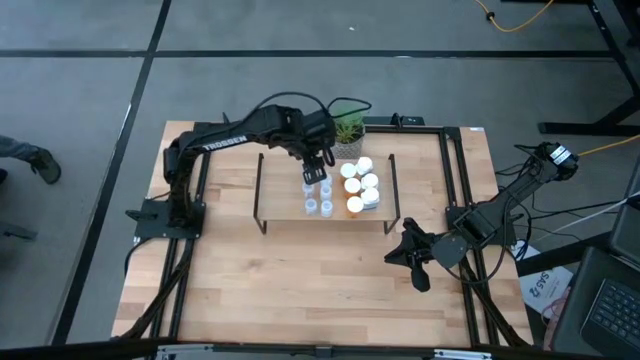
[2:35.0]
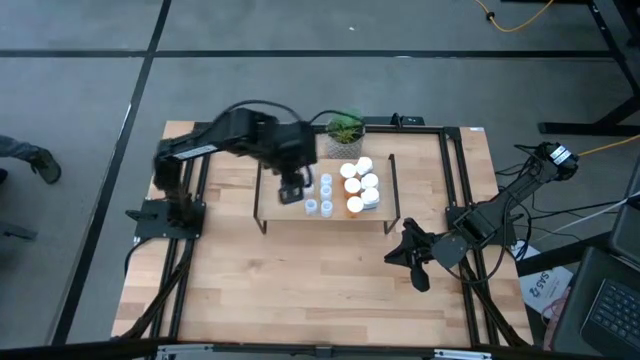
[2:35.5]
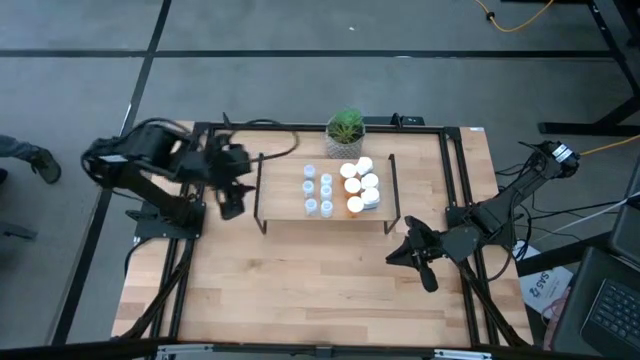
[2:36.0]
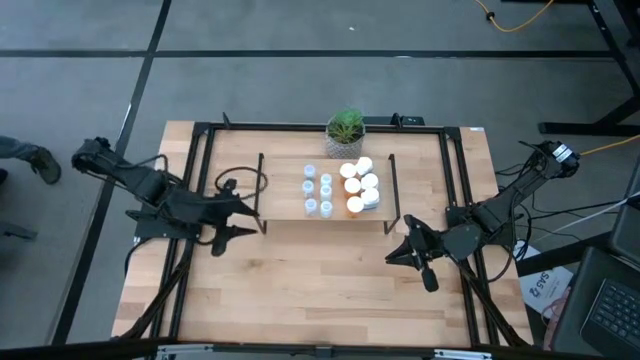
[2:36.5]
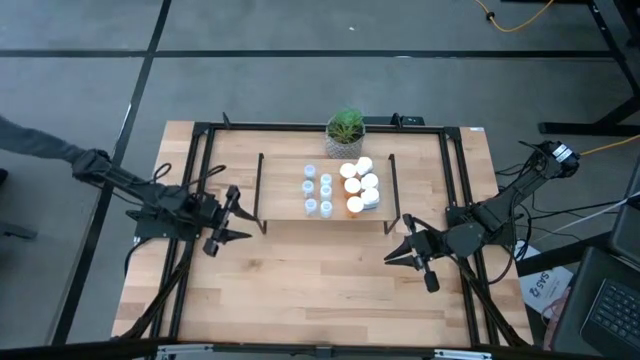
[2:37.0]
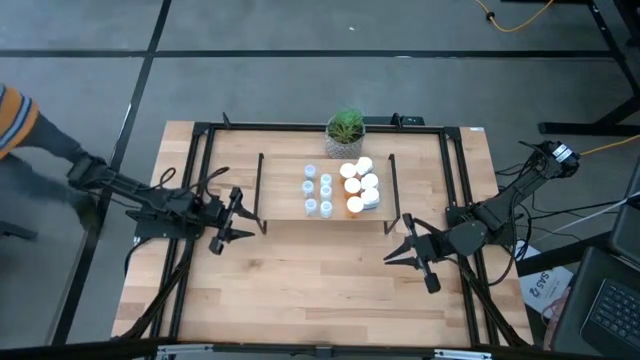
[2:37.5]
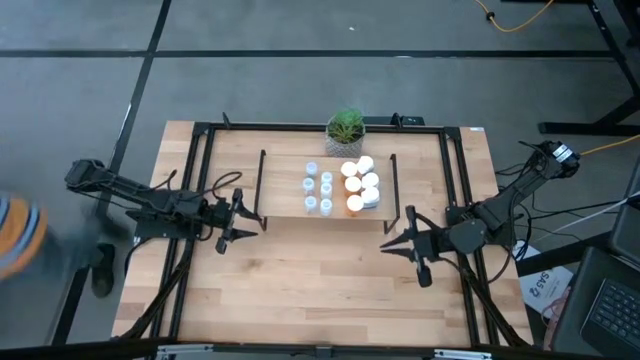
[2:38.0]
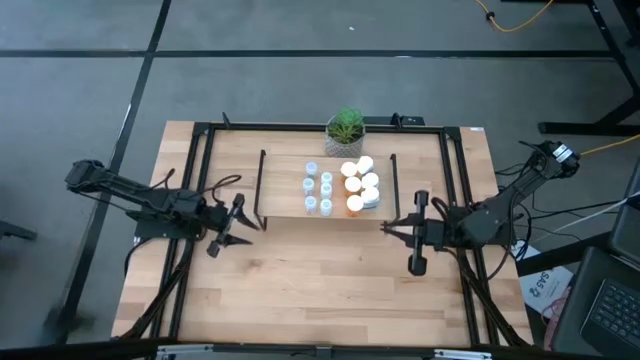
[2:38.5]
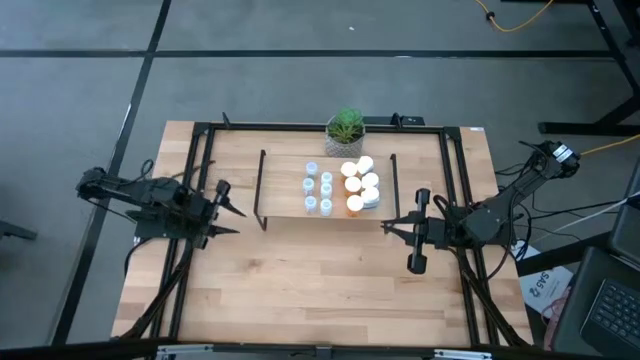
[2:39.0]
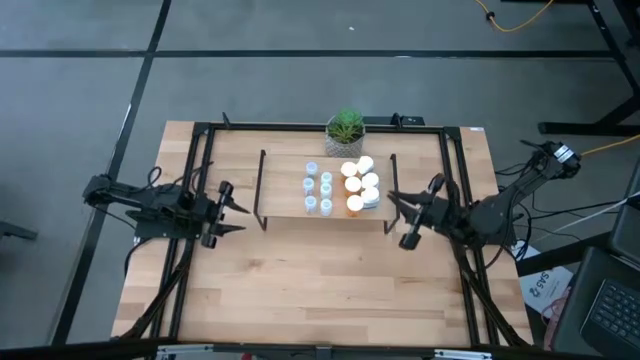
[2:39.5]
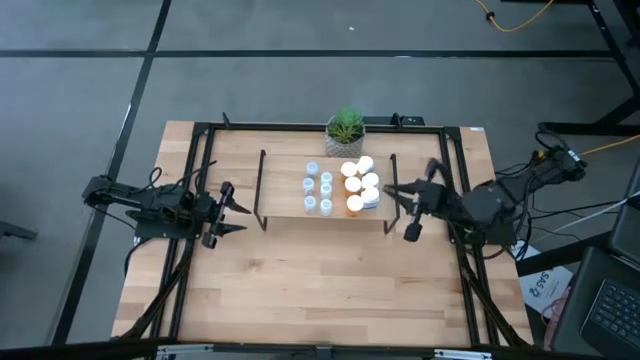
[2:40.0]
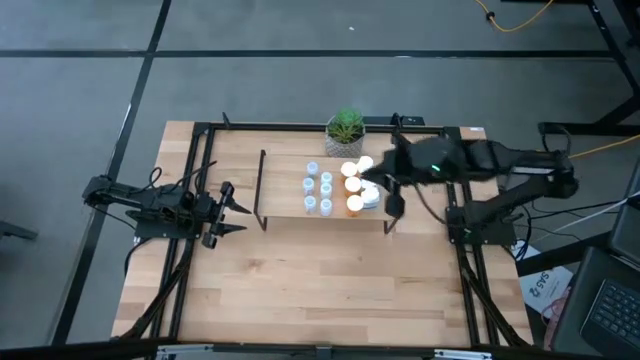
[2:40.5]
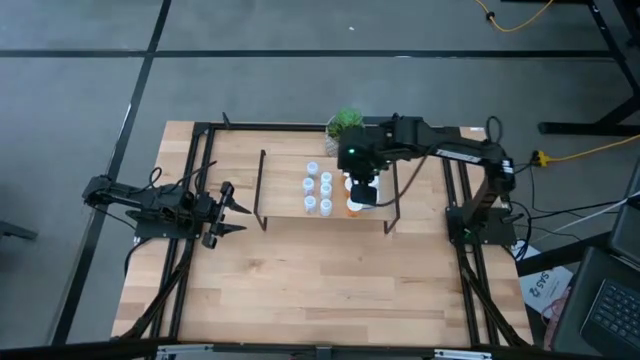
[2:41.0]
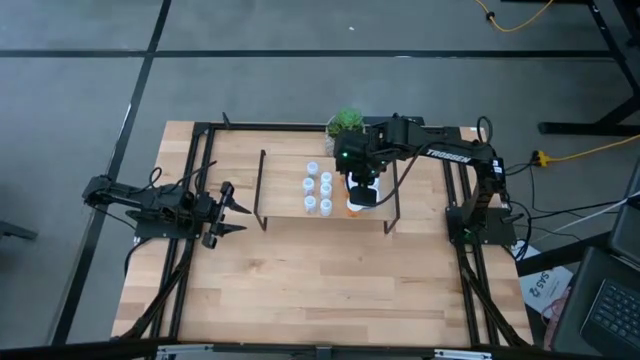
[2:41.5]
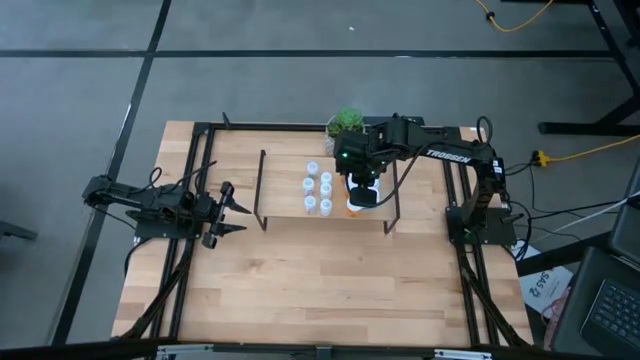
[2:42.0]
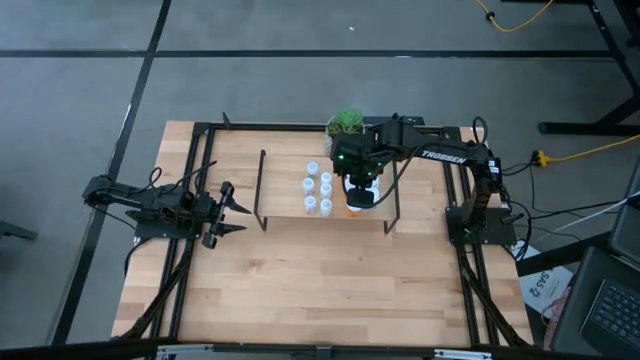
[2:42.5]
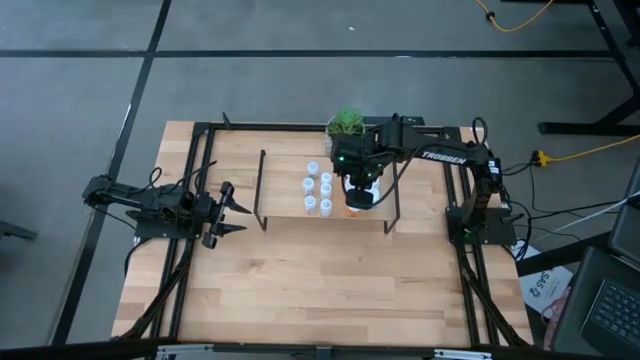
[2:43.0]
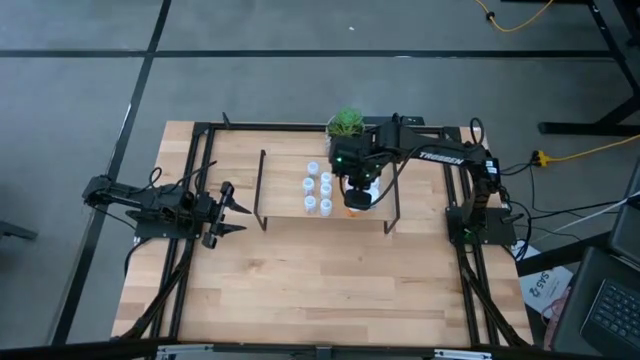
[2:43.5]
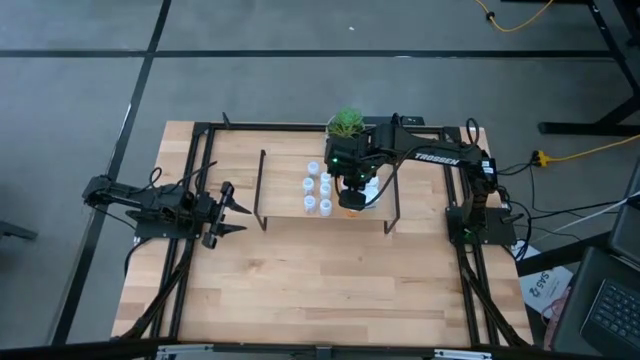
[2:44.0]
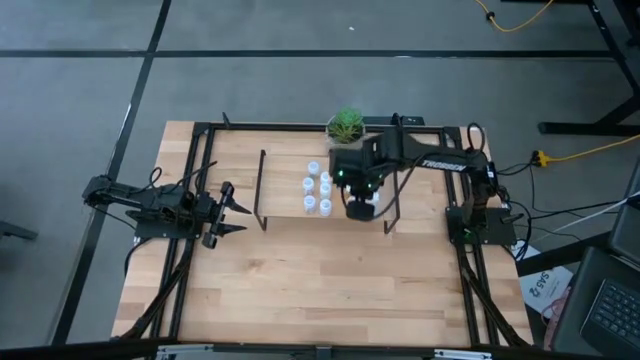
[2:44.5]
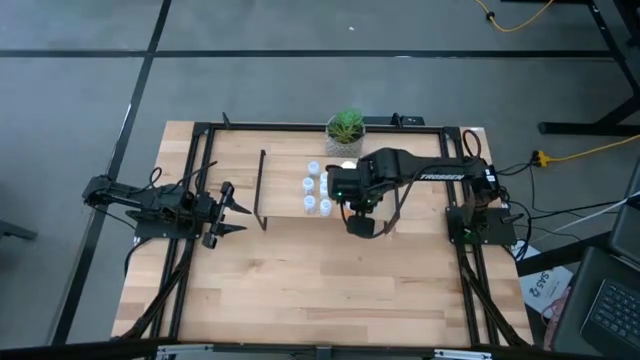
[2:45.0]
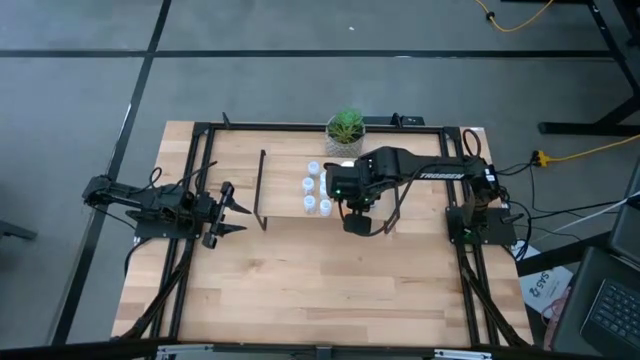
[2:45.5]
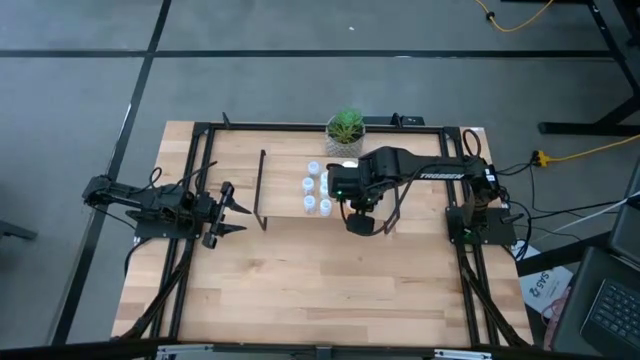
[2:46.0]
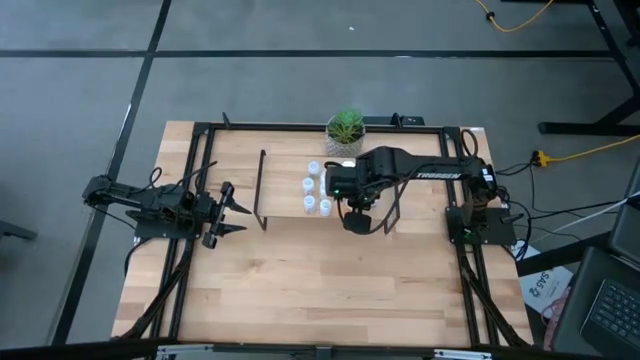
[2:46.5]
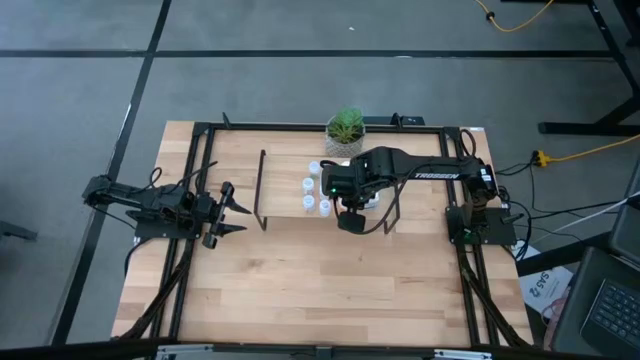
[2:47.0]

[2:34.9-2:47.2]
Task: Pick and place medicine bottles onto shelf by color
Adjust the orange pill bottles on the shelf

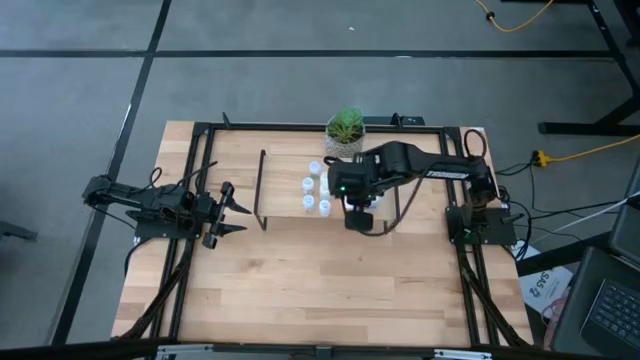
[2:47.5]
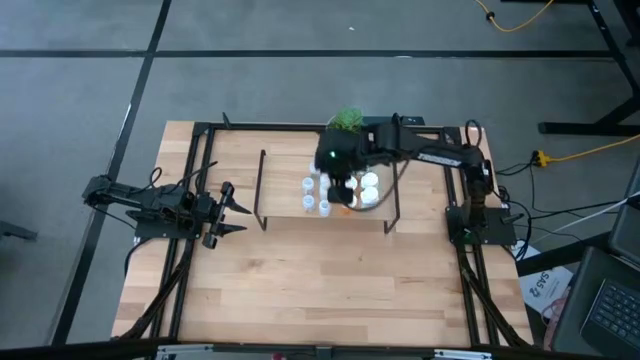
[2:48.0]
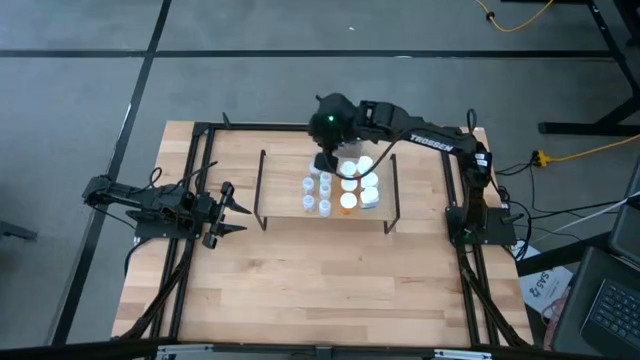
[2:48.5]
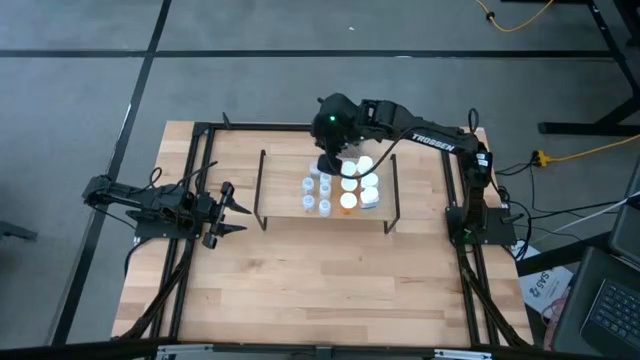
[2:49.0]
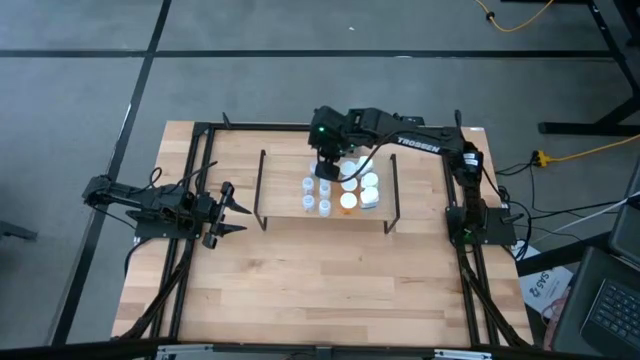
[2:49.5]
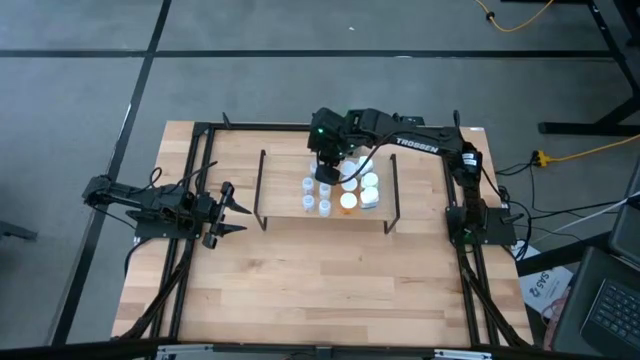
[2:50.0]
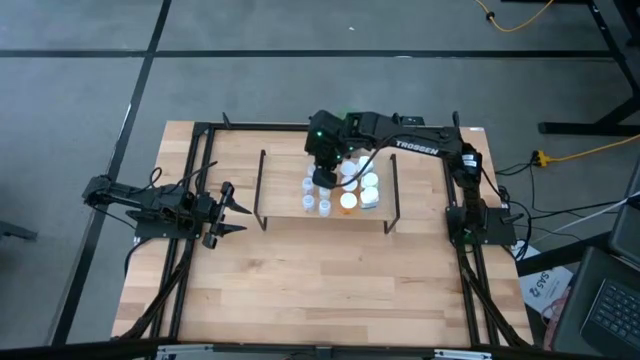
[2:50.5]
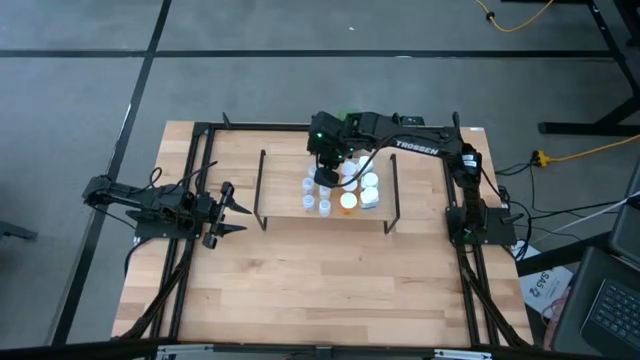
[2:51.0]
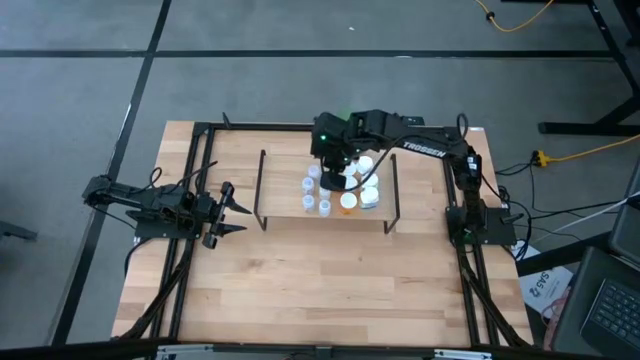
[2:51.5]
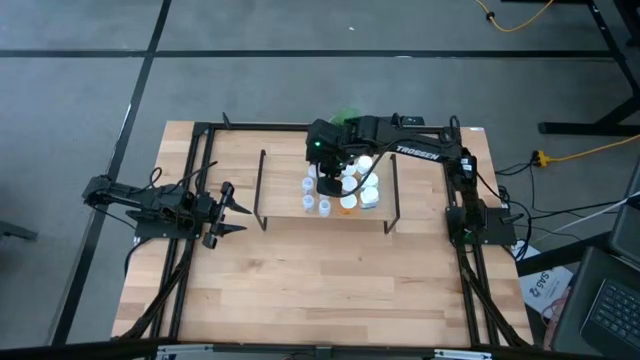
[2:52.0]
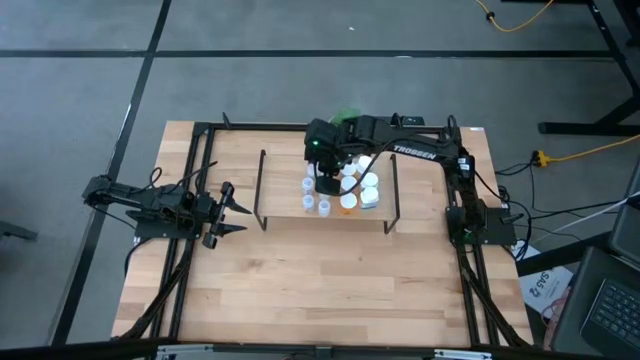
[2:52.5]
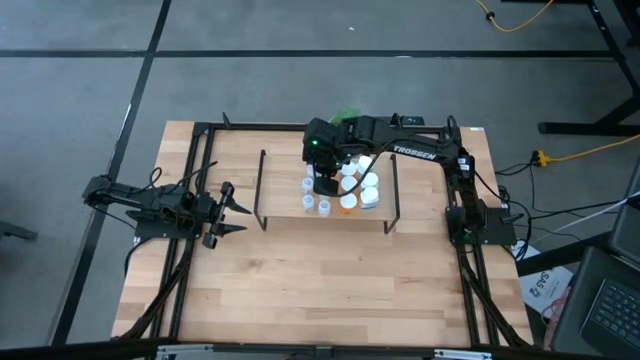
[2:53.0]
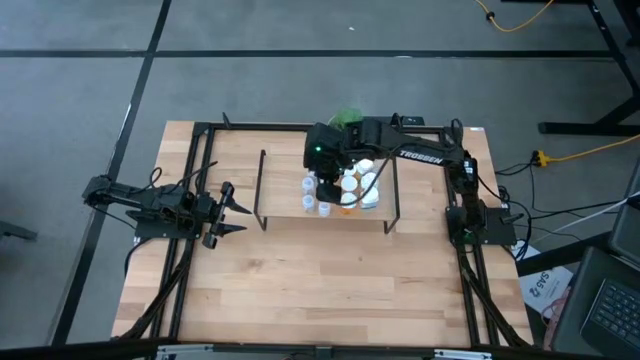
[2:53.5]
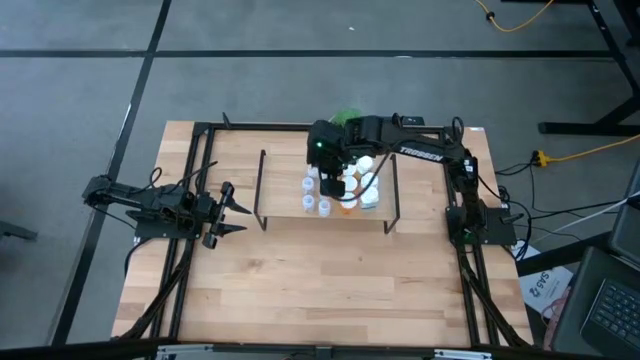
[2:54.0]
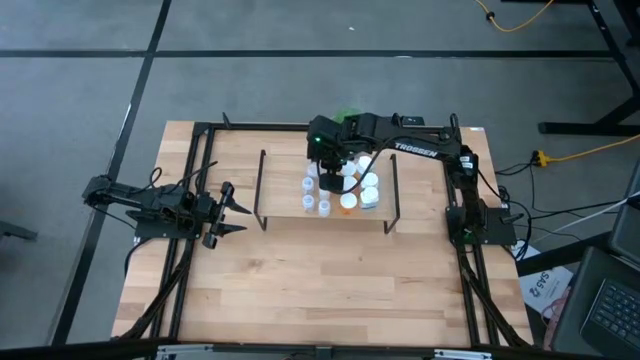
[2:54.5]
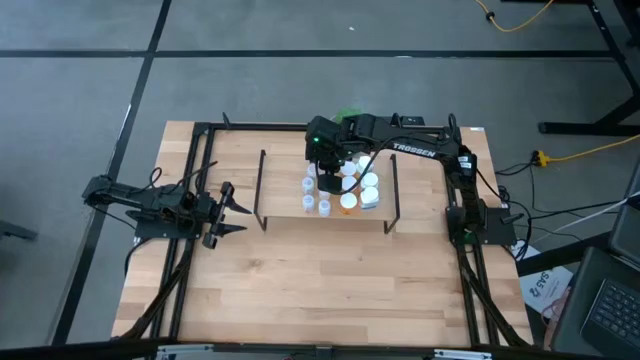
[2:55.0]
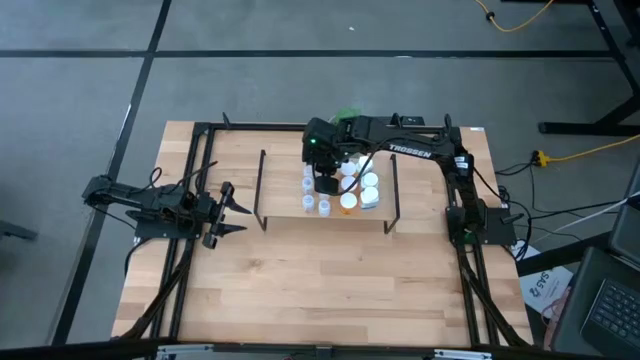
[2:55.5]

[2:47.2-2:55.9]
Adjust the transparent pill bottles on the shelf
